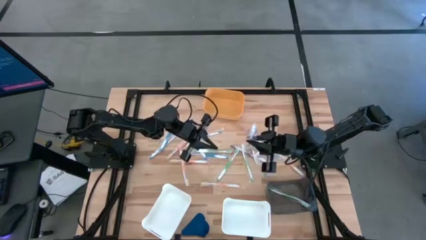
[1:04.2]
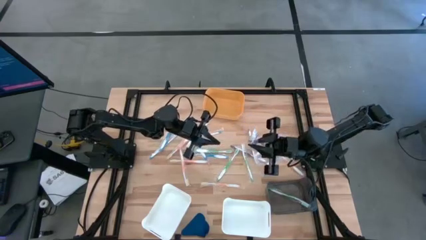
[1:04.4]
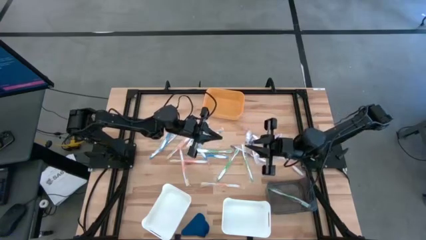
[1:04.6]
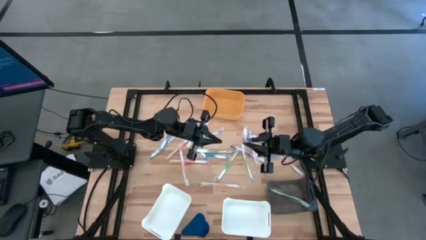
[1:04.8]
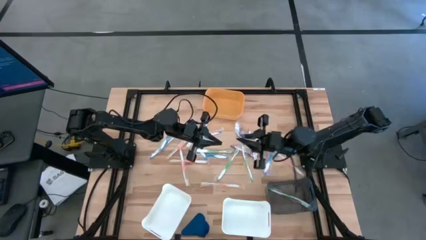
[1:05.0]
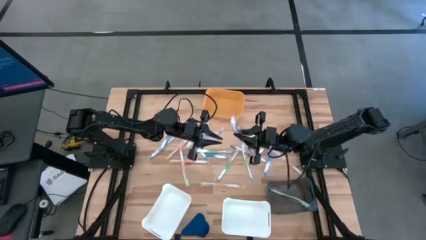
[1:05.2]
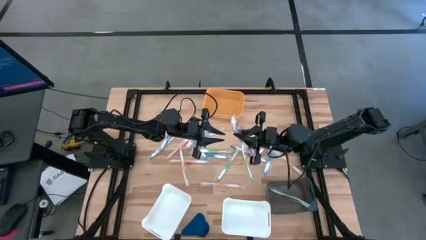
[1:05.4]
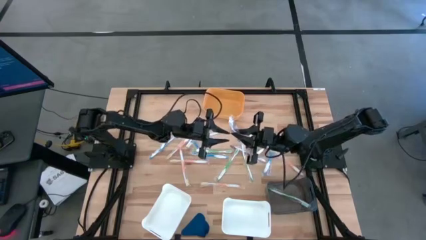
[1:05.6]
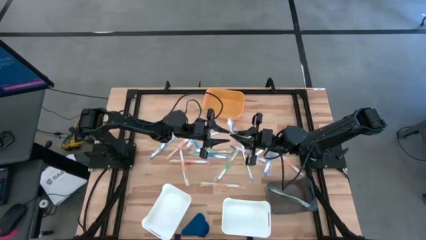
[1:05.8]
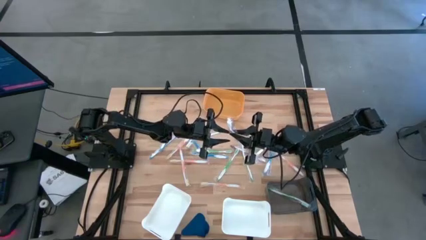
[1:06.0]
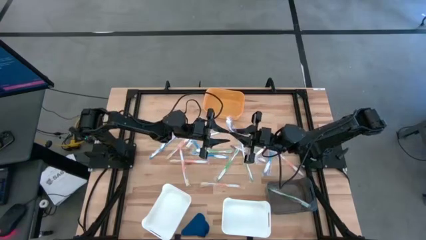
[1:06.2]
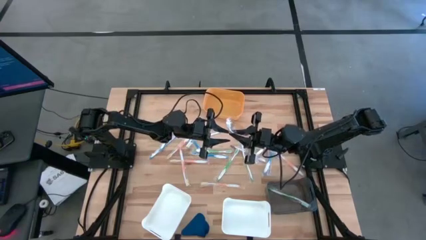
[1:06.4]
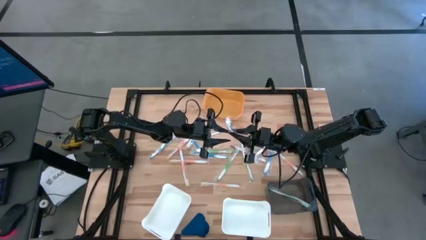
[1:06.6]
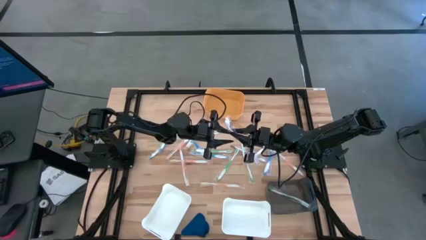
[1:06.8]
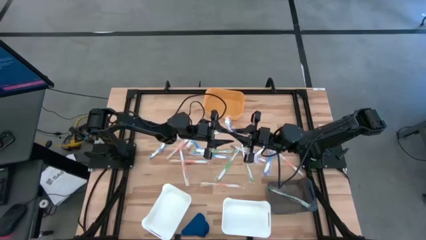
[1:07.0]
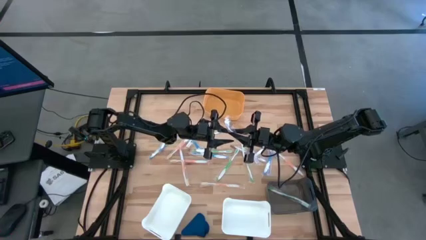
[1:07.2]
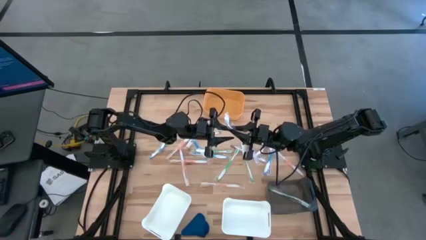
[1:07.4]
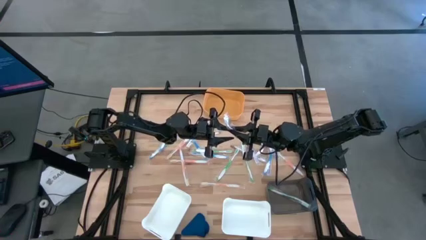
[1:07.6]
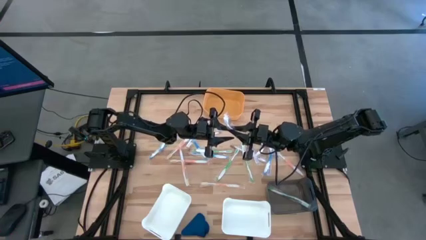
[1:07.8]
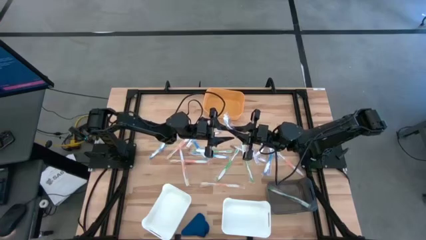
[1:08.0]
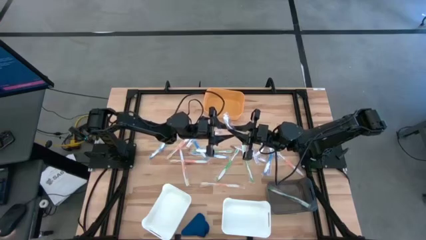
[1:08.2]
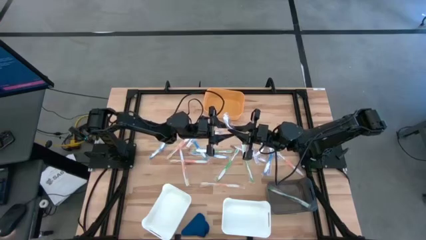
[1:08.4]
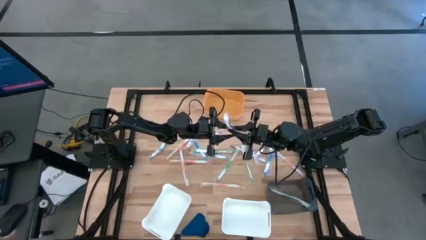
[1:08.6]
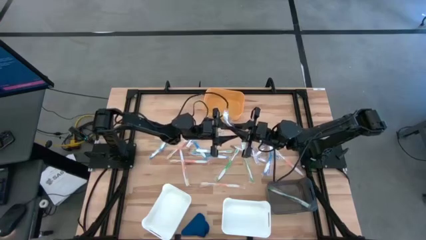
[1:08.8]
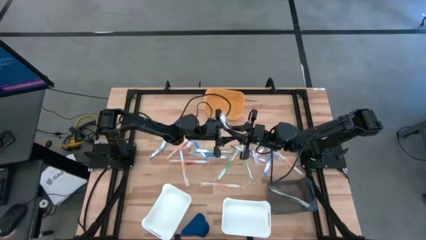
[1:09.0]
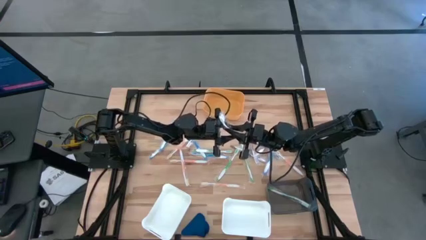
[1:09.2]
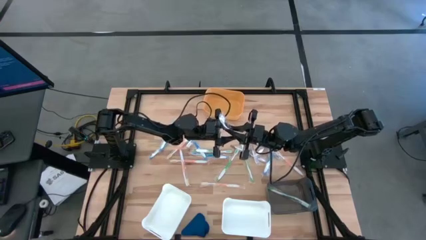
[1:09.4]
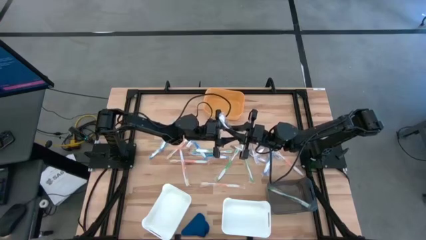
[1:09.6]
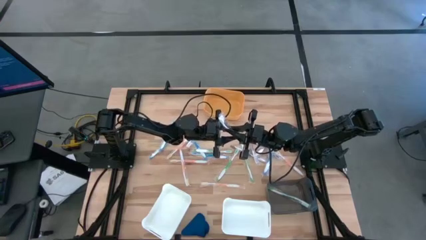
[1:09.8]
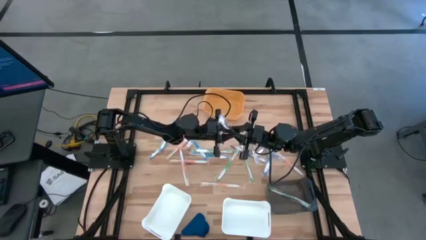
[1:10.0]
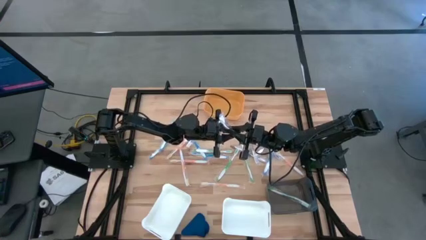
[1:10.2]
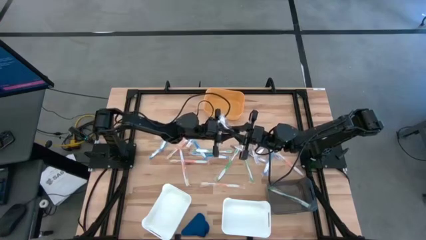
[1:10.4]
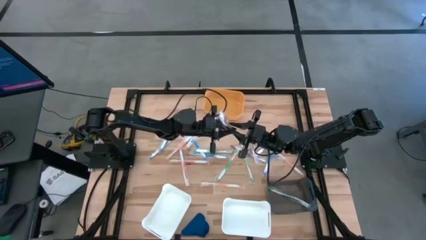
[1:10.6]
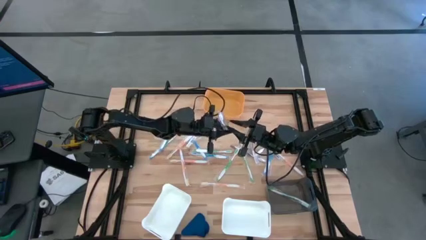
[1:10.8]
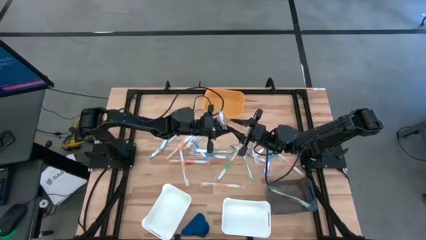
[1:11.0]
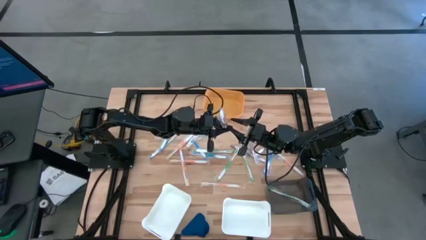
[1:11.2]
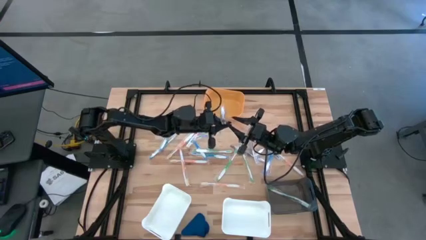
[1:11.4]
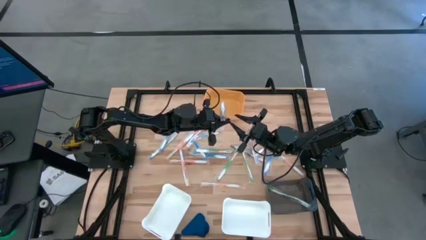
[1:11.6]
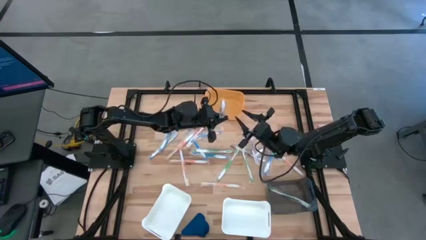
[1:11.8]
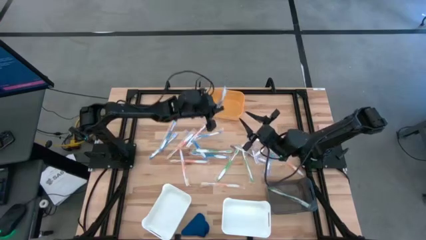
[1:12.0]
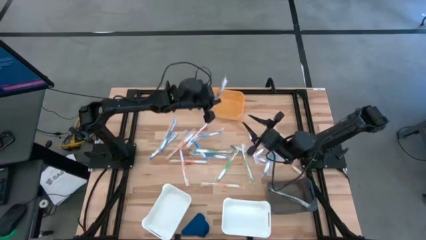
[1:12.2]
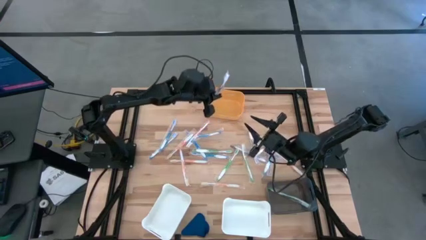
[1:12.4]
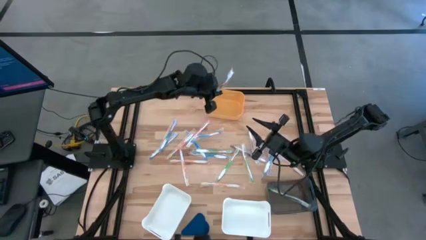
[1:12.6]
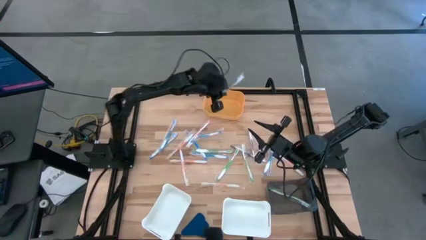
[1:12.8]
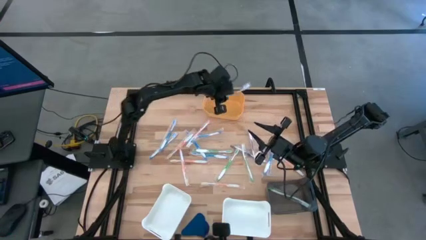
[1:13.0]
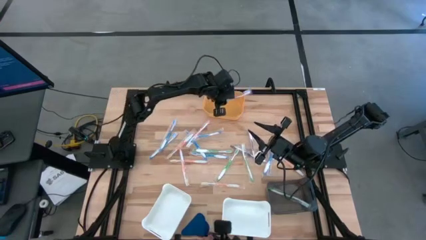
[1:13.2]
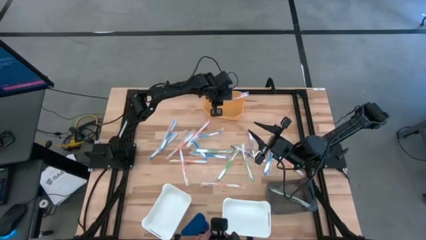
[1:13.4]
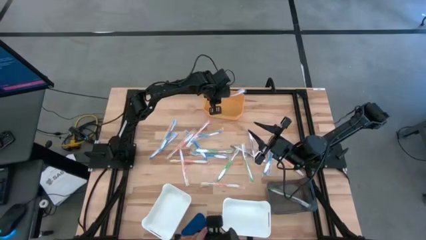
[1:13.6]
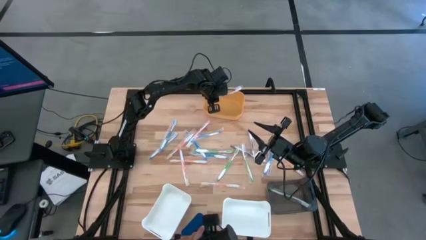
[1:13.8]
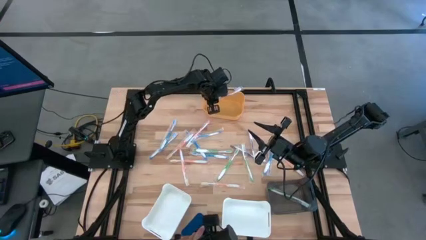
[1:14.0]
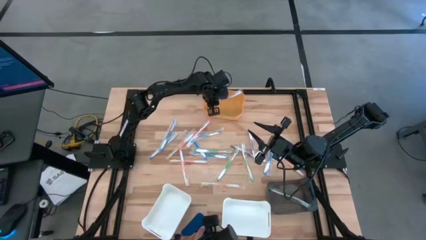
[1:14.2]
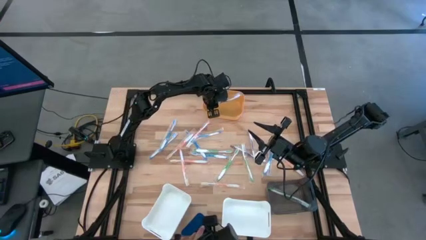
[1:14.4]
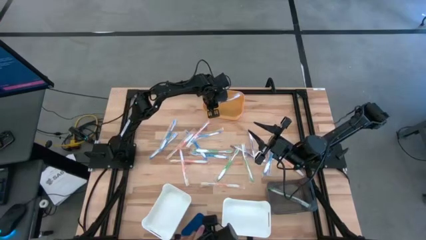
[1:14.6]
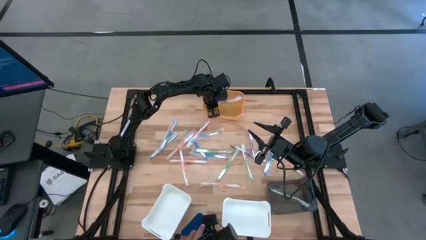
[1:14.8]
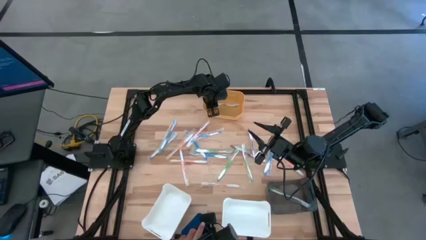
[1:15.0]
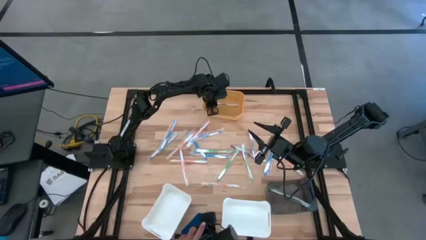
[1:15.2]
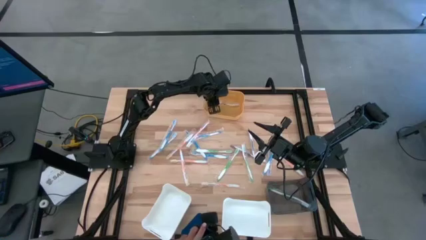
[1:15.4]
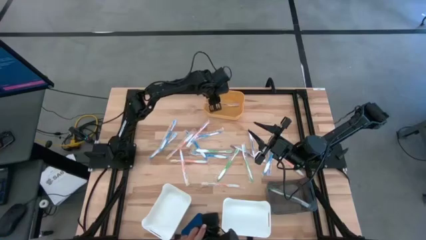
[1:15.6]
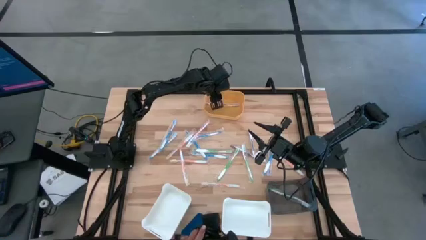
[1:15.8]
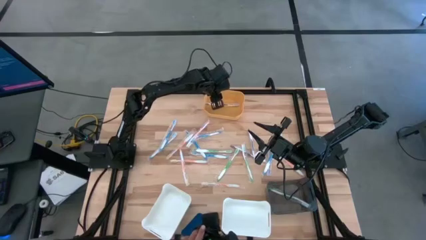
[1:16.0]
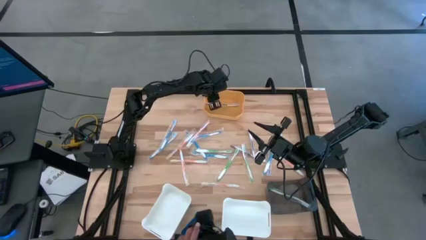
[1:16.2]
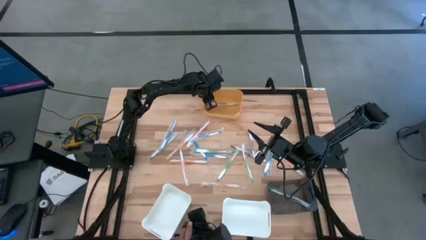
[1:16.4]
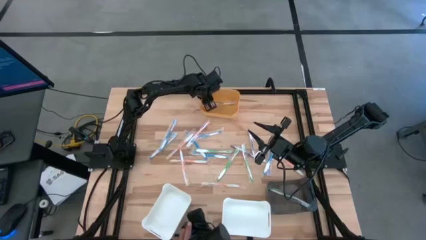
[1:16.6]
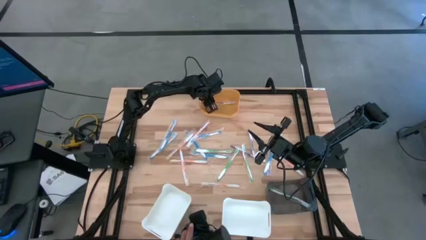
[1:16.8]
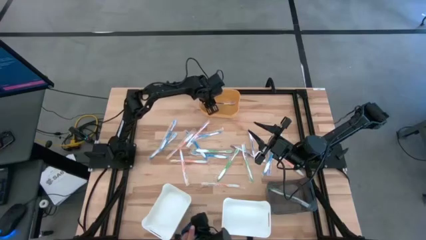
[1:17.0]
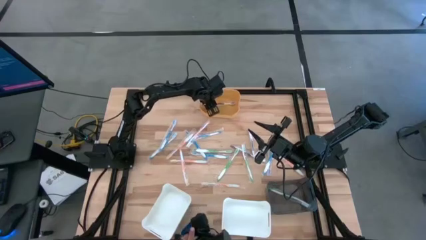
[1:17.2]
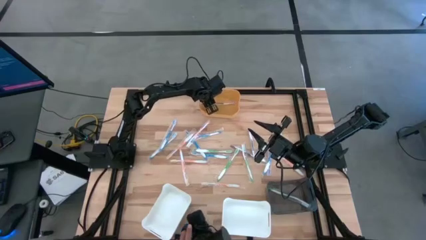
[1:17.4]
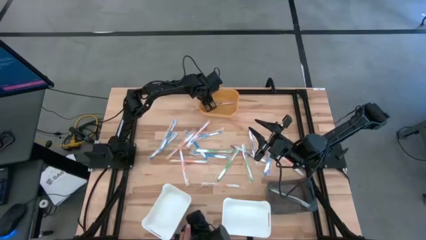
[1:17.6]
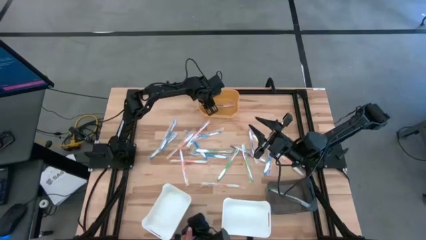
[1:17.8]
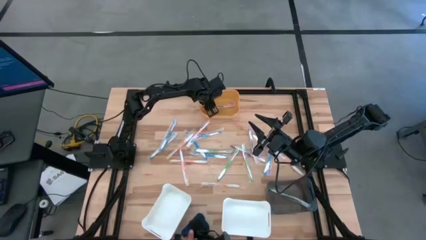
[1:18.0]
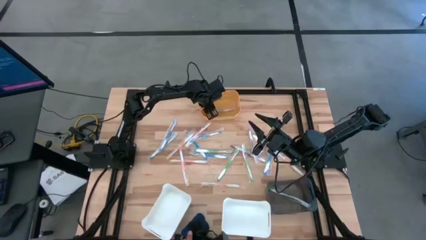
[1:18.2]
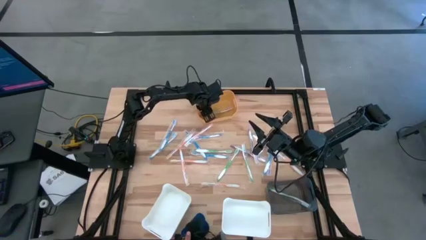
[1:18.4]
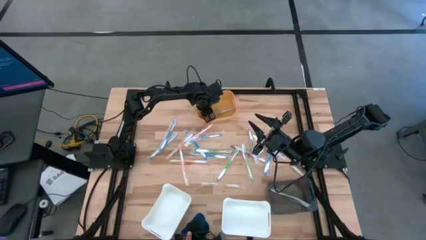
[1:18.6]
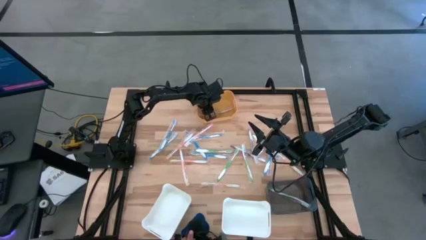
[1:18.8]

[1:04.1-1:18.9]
Task: Pick & Place Toothbrushes
Put the purple toothbrush into the yellow bin

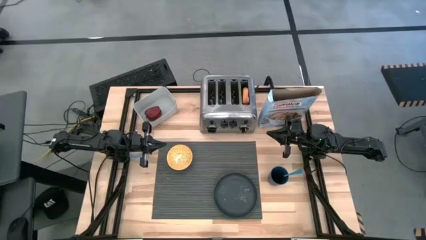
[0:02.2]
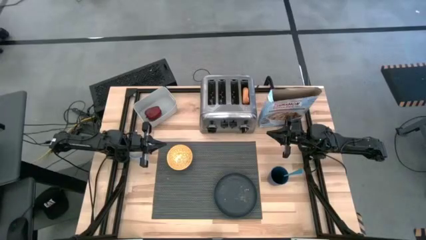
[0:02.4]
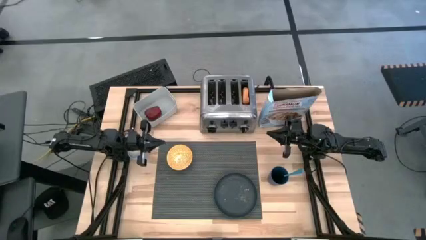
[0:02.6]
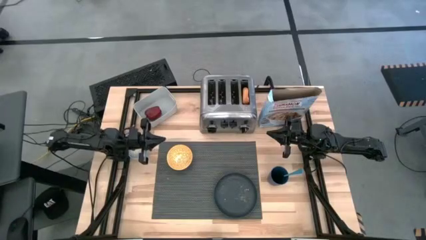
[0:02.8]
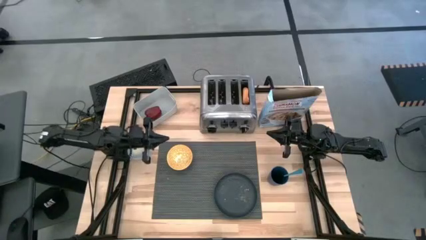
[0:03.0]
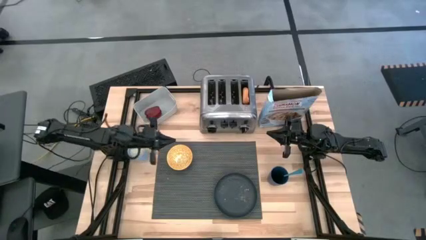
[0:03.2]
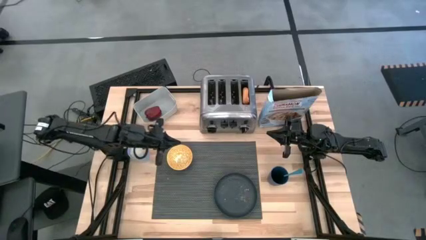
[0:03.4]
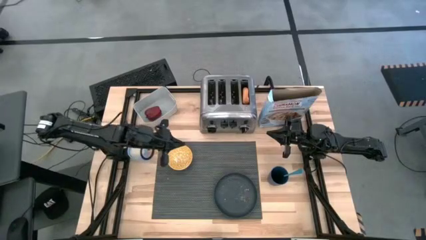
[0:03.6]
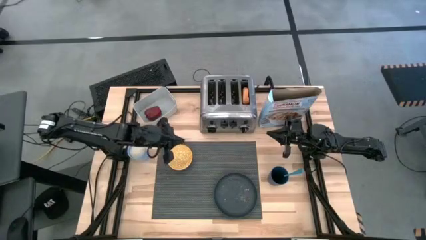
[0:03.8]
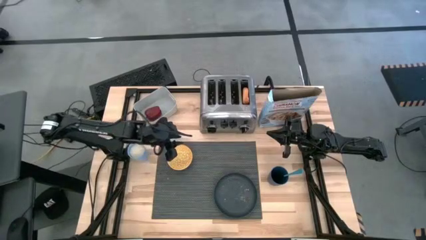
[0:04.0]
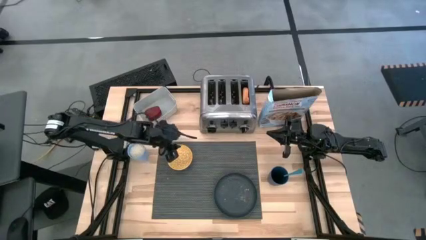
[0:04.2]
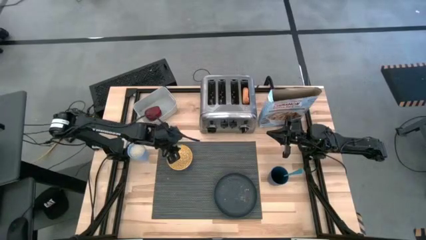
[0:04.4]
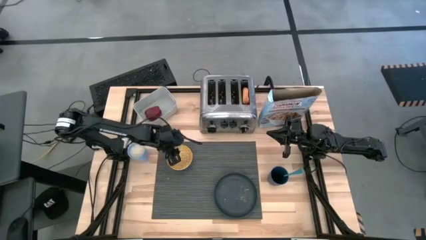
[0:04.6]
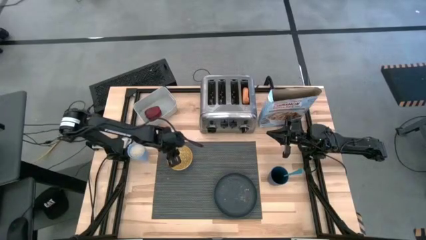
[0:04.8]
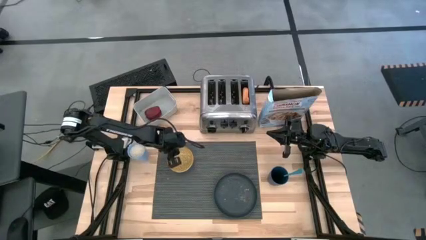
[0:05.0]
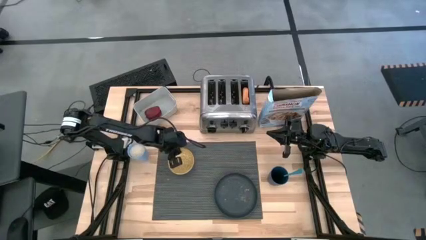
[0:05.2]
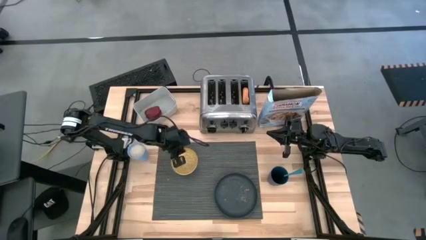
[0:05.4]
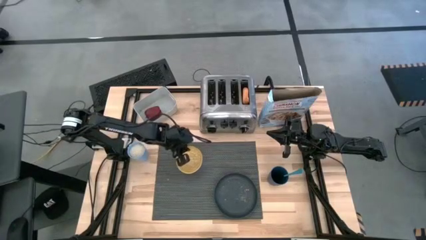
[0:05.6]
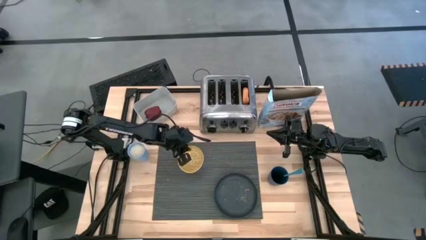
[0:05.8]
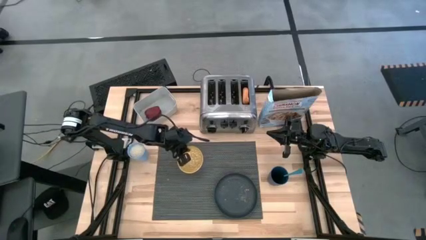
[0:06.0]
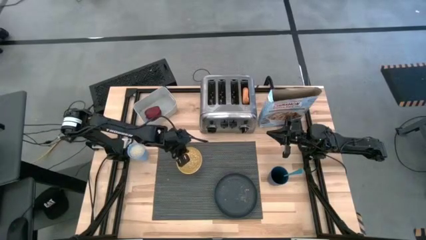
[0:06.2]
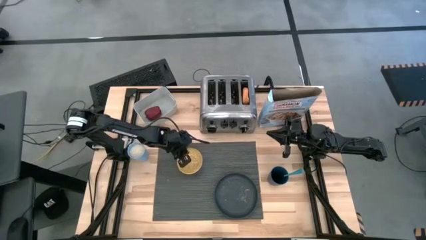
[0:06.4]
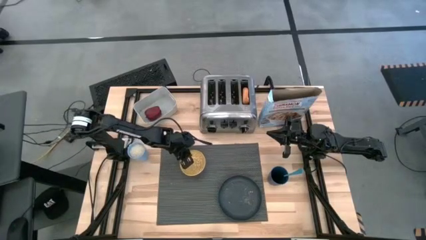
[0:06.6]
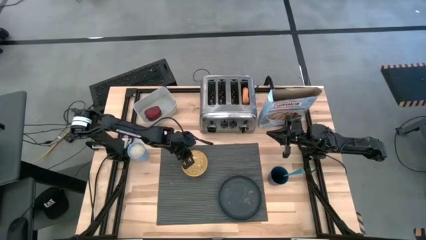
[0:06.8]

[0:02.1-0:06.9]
Task: Arrange a breakfast setting
Adjust the yellow bowl on the gray place mat
